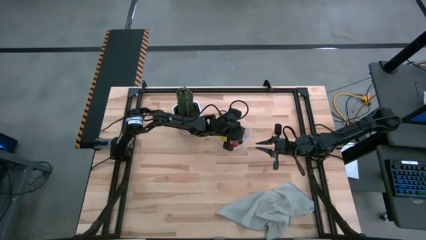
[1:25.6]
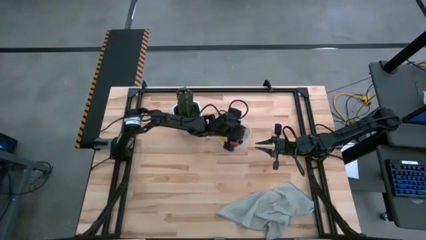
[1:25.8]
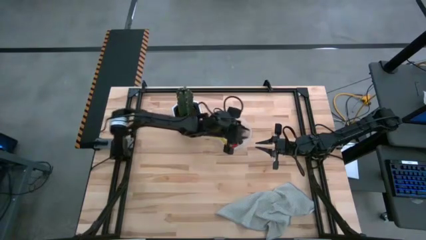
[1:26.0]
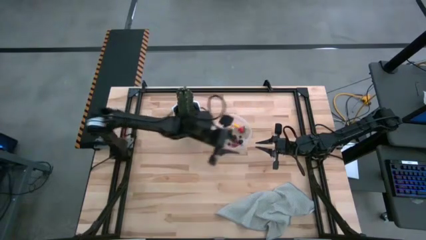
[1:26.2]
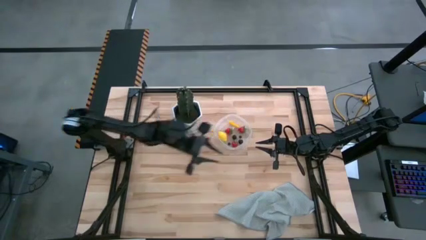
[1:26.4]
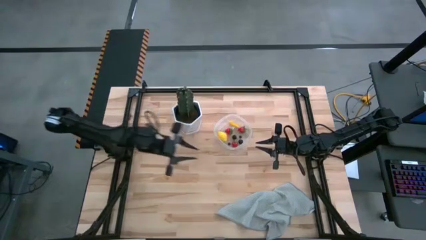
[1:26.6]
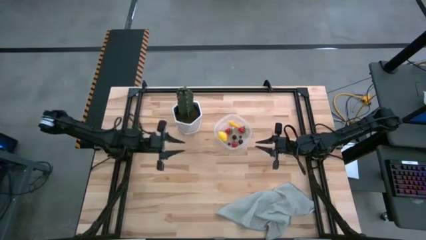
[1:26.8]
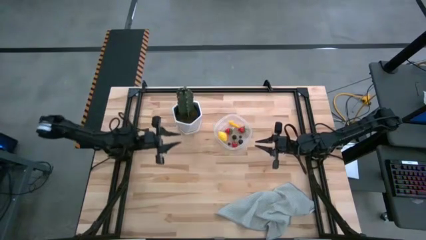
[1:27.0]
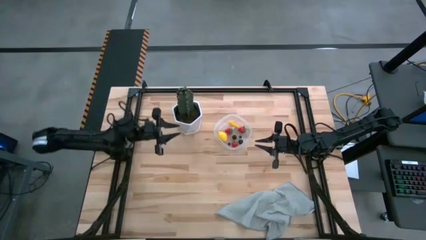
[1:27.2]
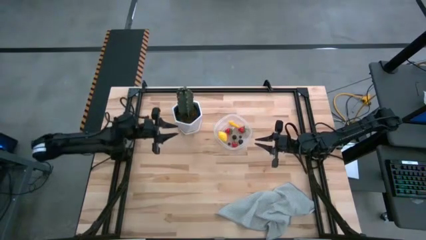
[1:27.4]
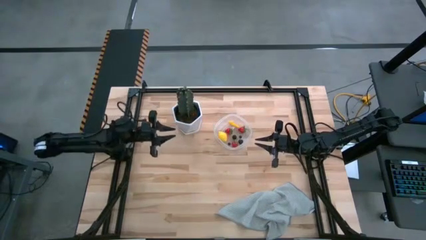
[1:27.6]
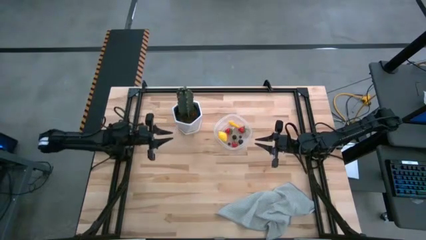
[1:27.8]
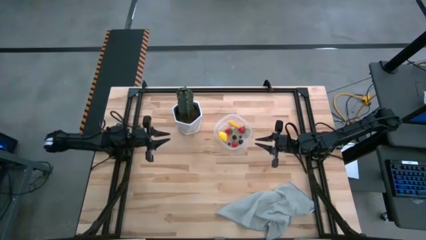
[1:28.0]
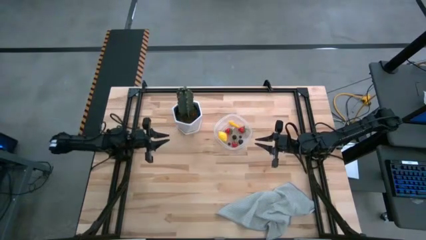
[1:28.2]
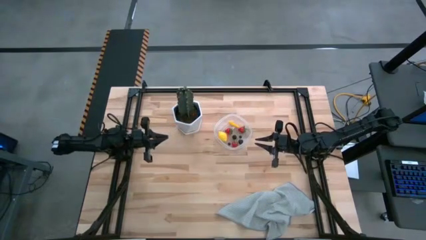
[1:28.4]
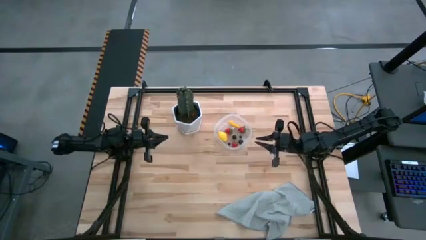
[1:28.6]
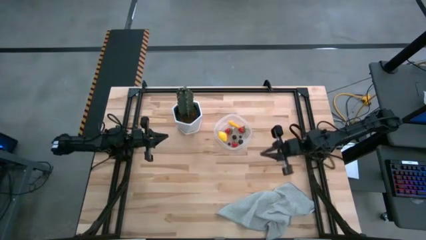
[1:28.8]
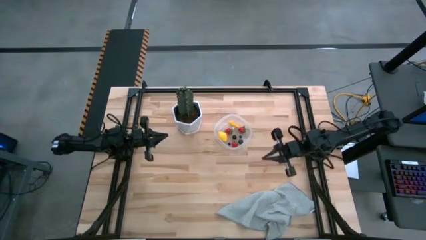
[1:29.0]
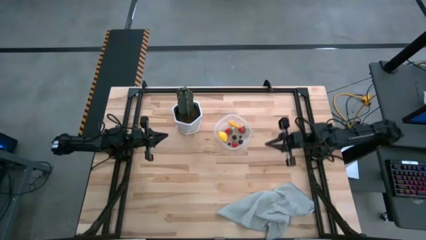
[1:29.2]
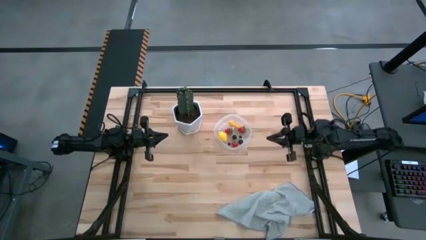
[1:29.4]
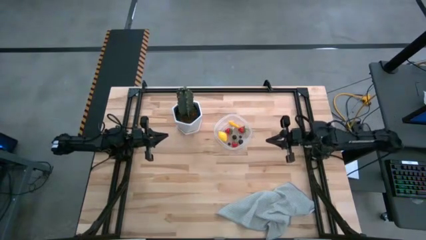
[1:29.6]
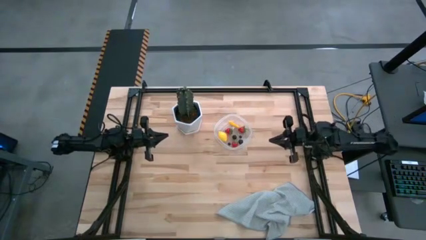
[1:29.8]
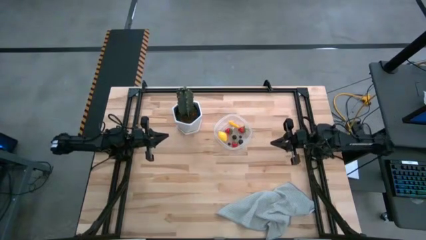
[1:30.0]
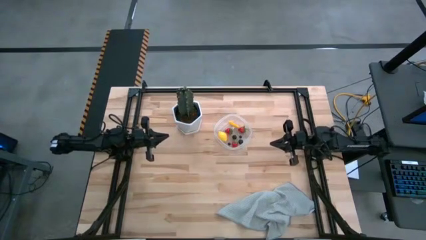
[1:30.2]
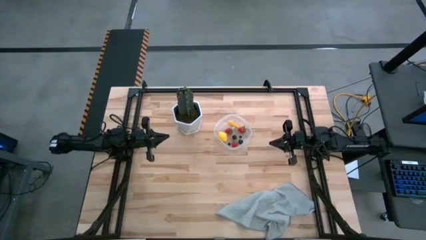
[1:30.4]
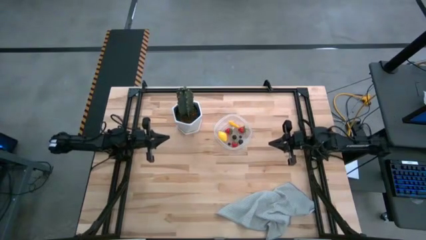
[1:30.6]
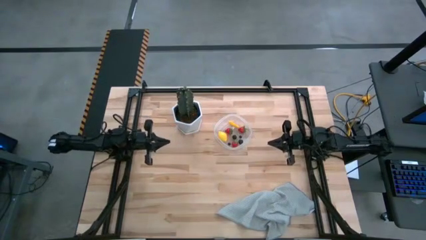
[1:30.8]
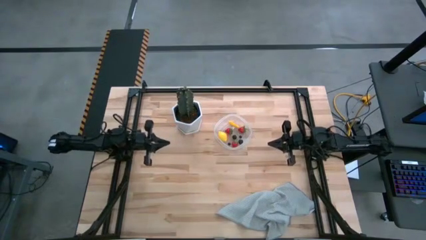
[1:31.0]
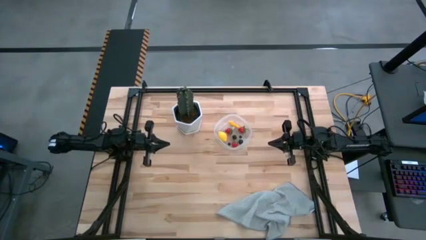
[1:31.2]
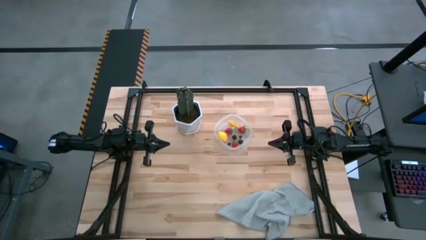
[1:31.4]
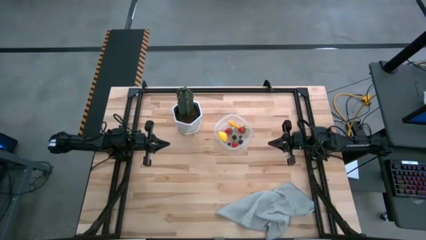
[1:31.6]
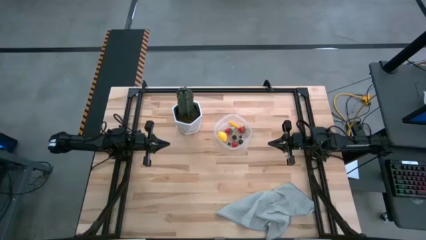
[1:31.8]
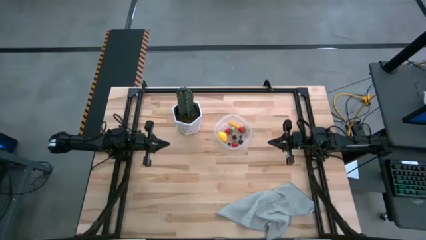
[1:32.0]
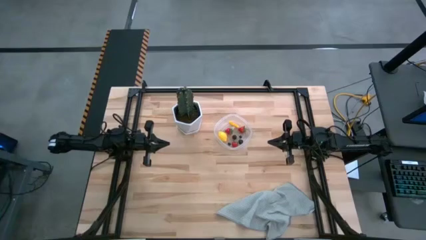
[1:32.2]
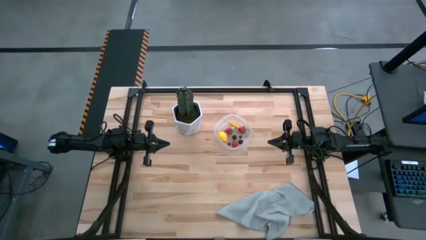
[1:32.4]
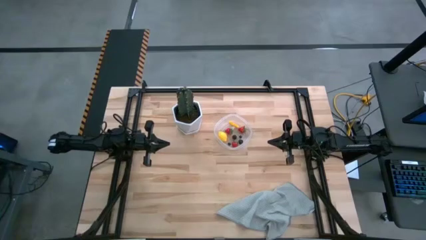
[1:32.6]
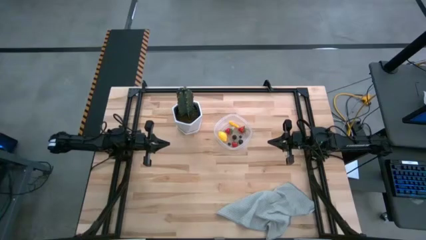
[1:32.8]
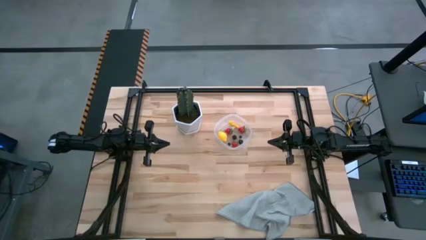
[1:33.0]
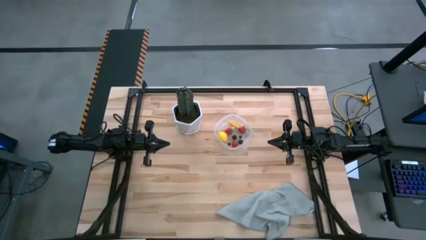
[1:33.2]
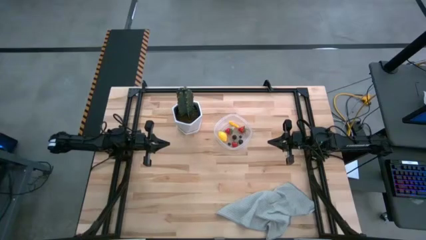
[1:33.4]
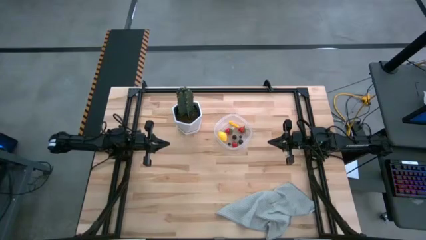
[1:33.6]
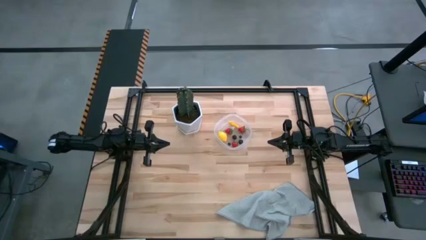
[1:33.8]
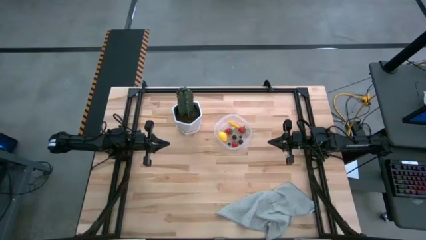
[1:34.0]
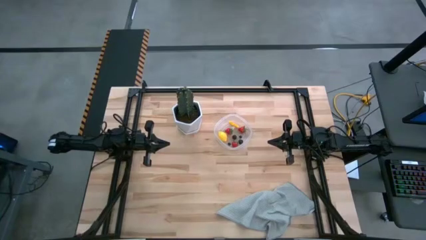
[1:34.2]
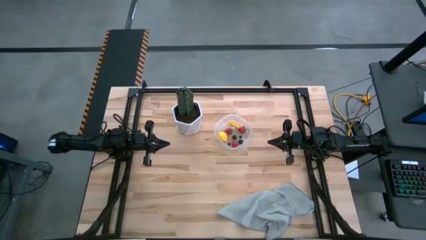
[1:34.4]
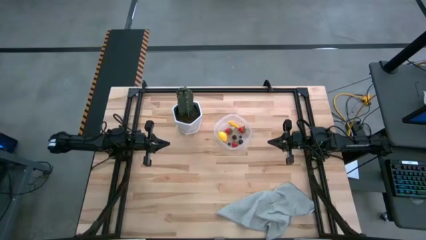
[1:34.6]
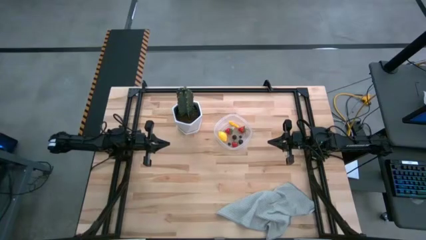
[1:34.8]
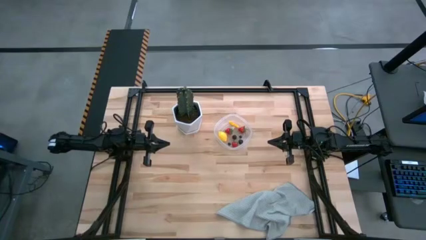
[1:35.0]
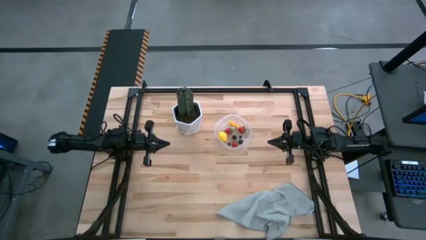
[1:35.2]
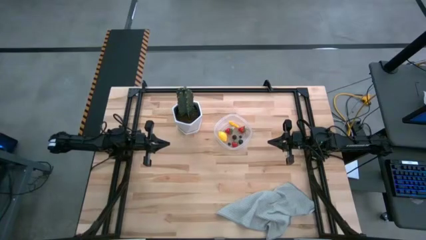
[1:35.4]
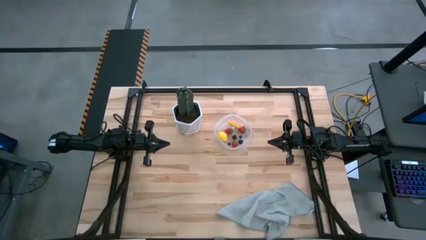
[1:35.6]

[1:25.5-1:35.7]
Task: Pick and placing Produce into tupperware
Return to Home Position

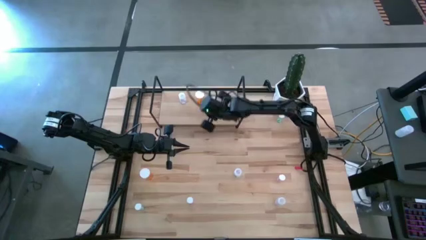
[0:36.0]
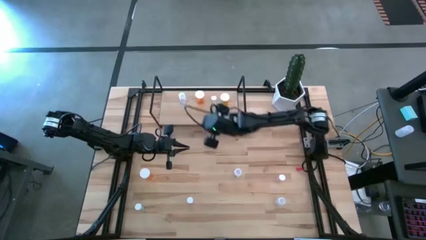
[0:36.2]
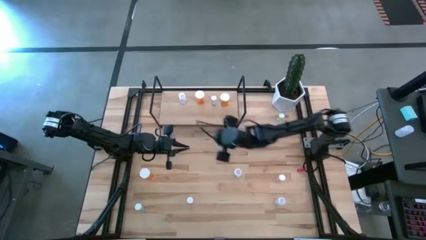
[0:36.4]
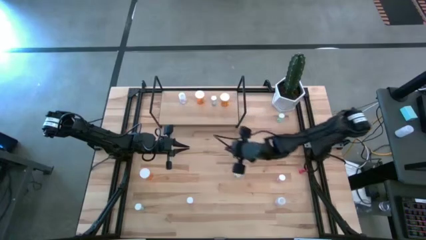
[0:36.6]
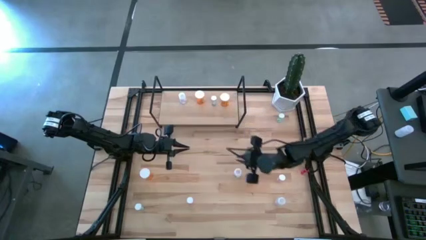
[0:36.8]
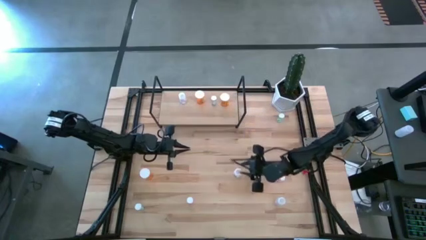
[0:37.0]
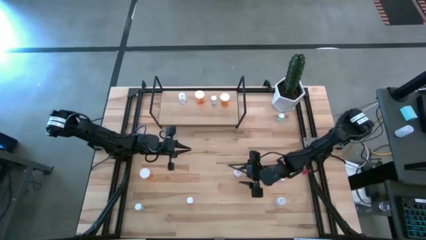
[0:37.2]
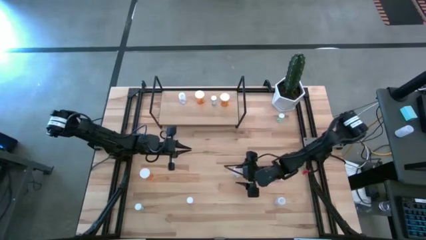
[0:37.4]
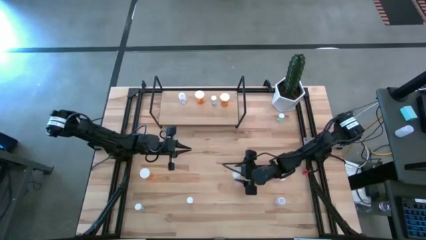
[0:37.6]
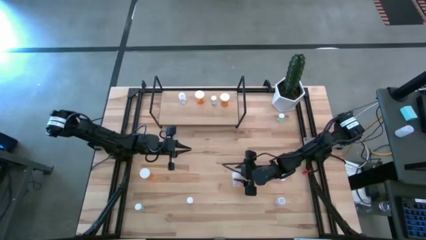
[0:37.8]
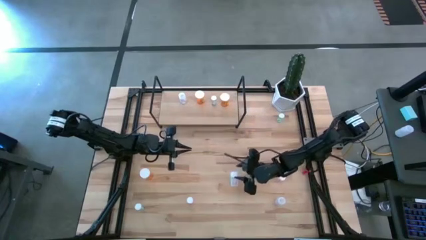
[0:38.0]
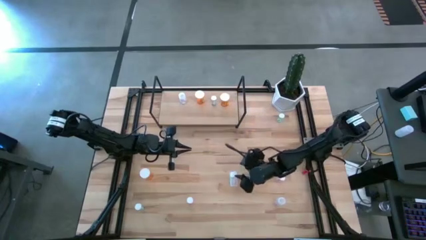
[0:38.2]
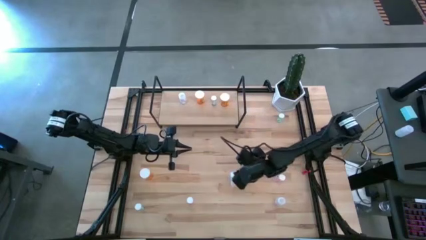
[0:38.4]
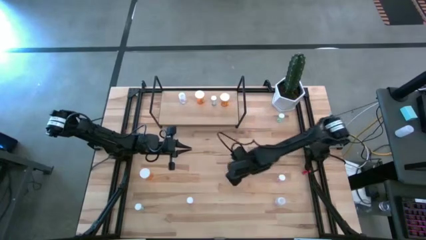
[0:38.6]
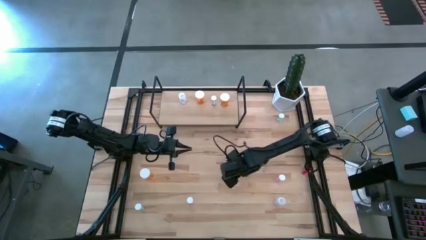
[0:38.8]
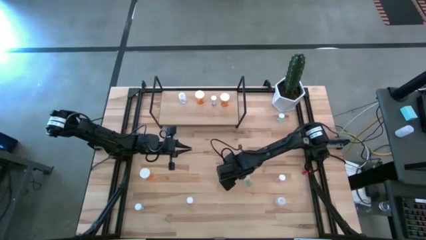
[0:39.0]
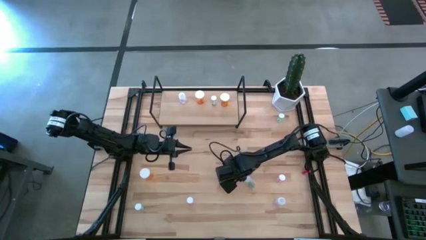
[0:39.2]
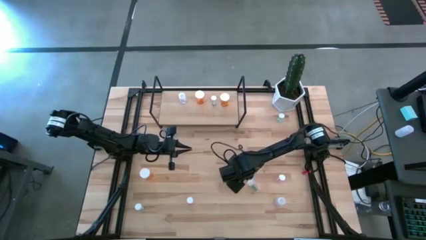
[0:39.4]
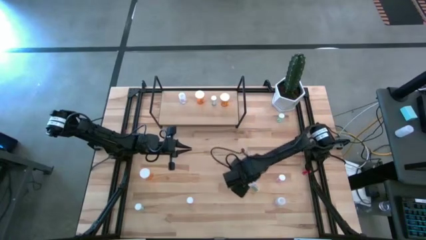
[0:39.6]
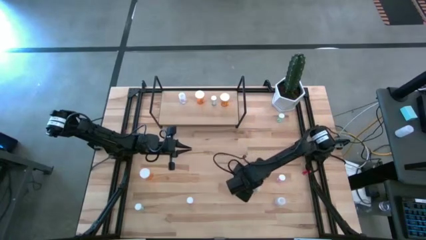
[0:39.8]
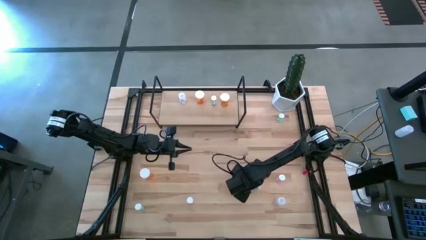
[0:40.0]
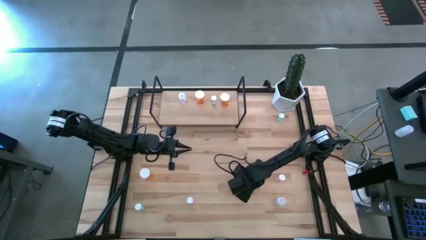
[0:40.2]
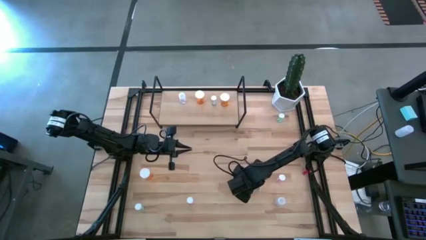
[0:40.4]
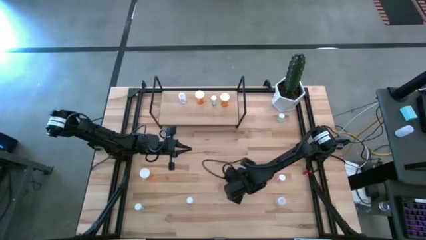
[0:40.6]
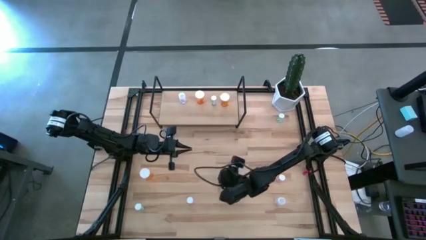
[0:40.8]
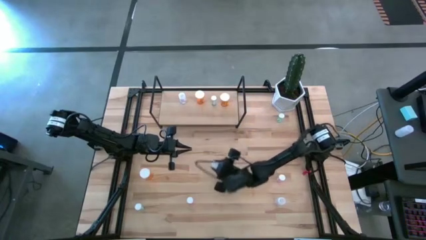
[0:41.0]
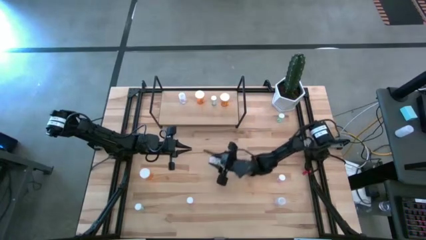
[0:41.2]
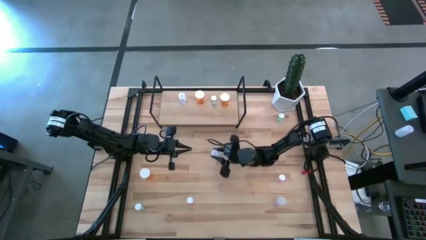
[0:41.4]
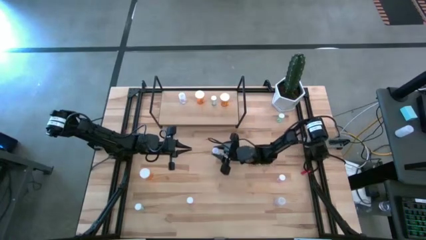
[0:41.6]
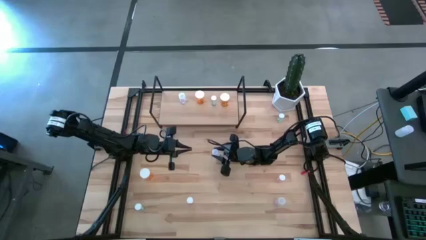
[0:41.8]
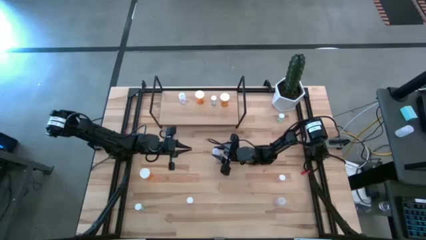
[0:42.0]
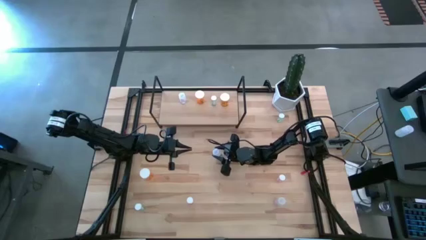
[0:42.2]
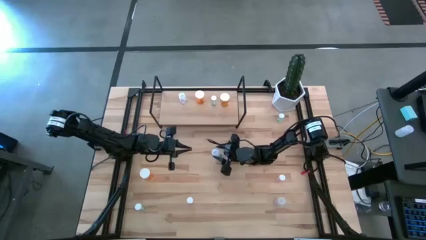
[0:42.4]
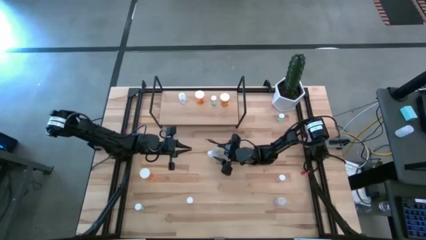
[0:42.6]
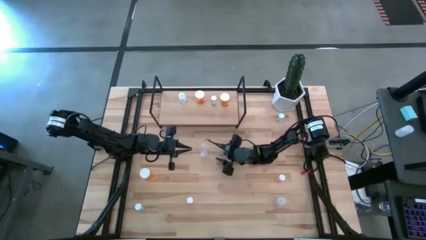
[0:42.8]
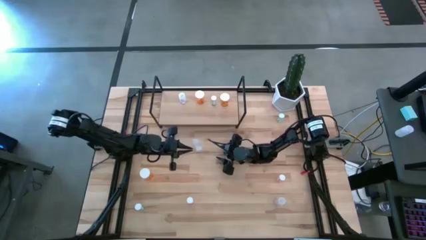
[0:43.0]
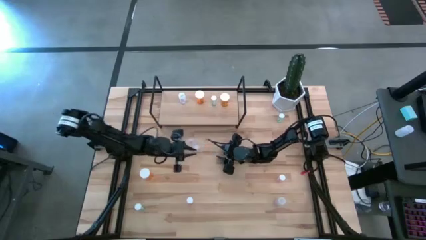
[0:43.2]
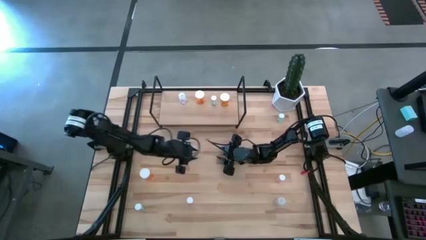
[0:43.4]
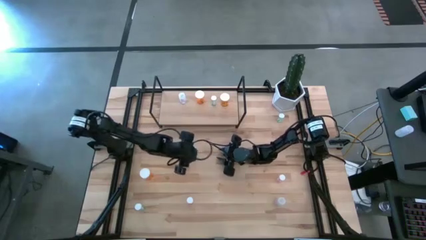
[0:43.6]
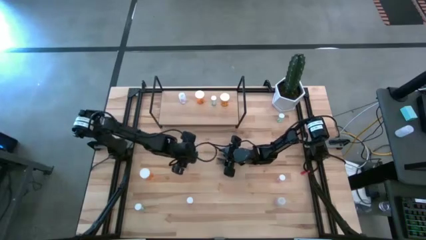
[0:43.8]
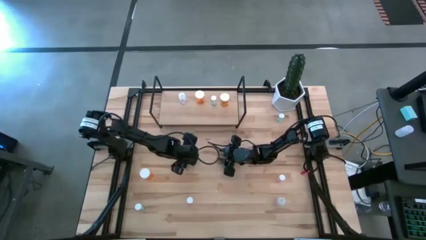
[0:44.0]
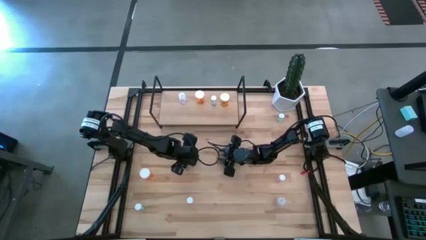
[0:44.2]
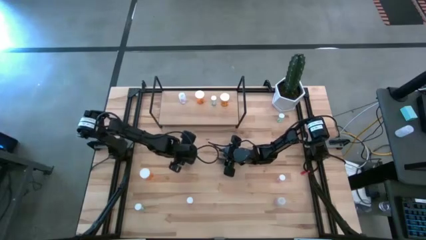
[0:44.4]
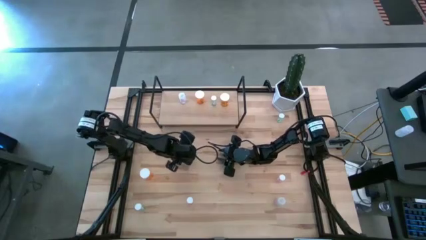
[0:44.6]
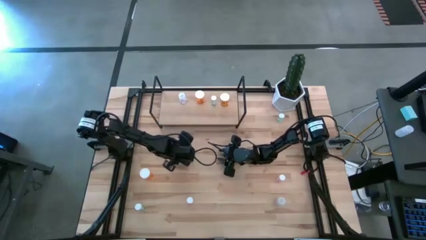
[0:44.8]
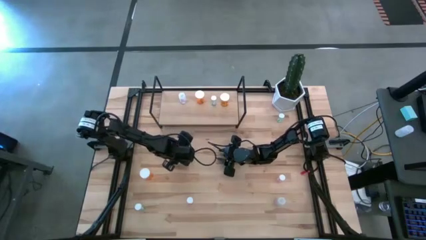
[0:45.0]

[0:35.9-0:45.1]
Task: Pick and place medicine bottles onto shelf by color
Put the top transparent pill bottle on the shelf
